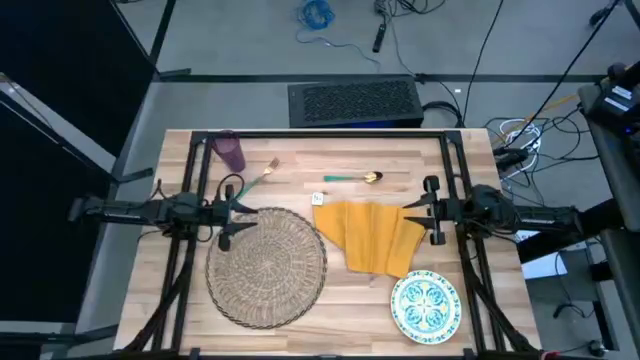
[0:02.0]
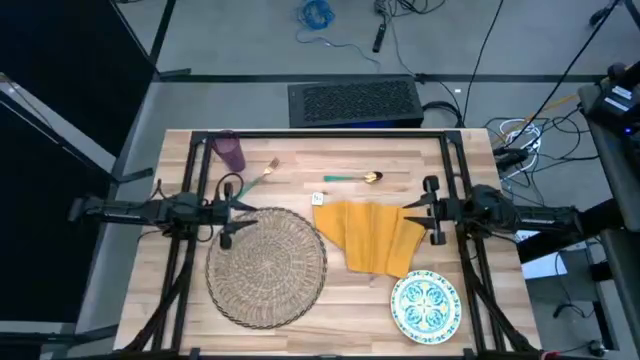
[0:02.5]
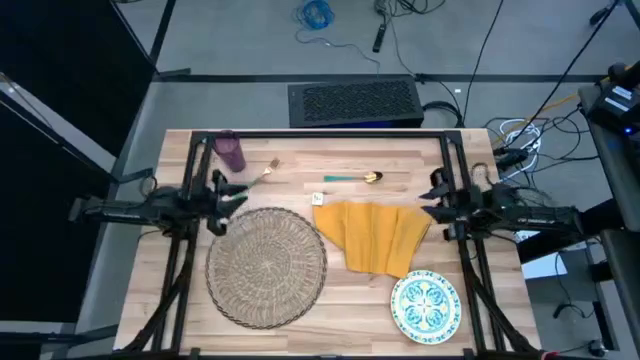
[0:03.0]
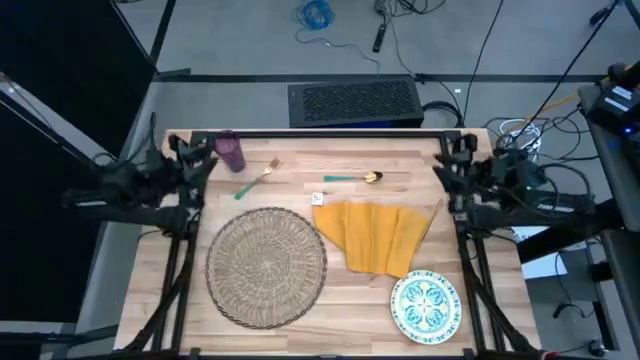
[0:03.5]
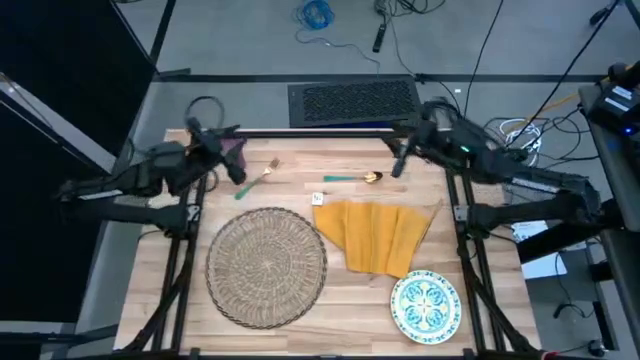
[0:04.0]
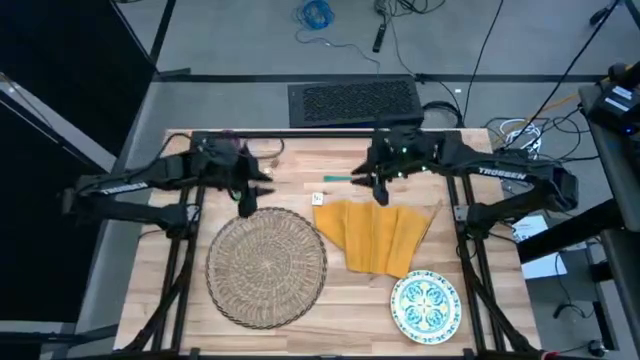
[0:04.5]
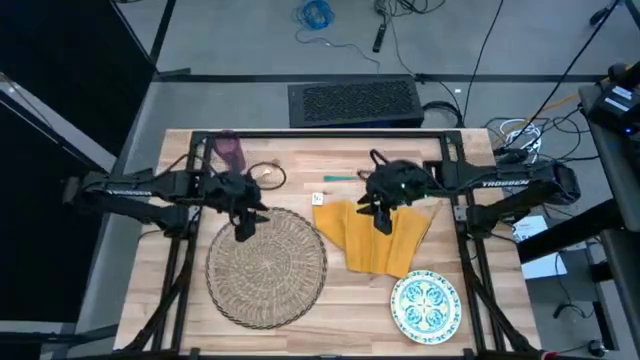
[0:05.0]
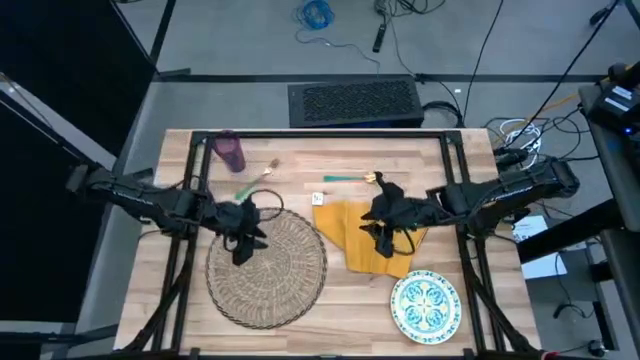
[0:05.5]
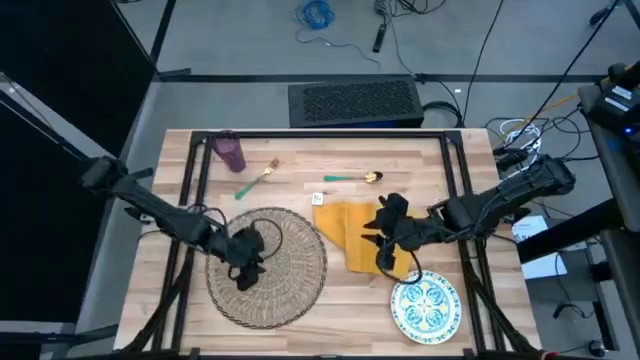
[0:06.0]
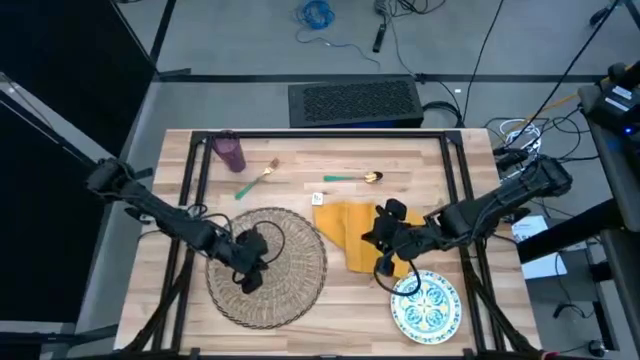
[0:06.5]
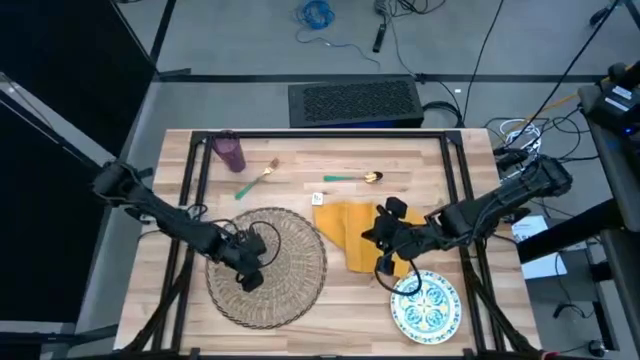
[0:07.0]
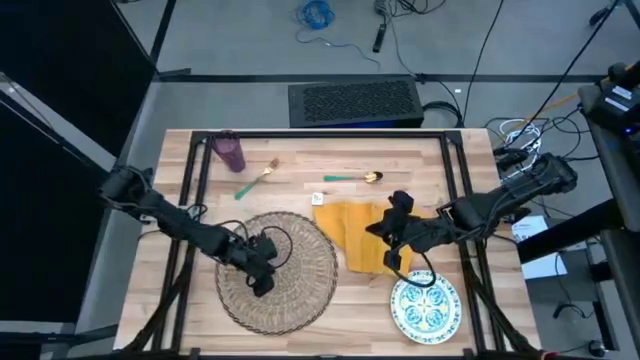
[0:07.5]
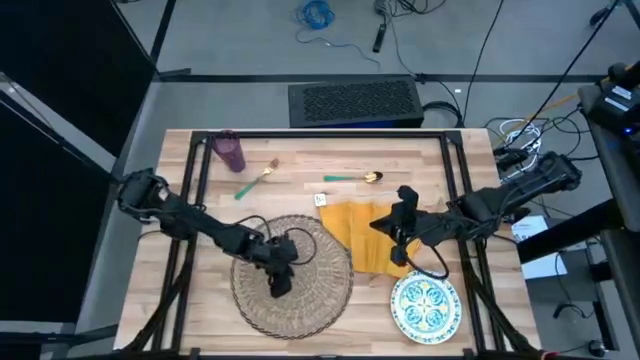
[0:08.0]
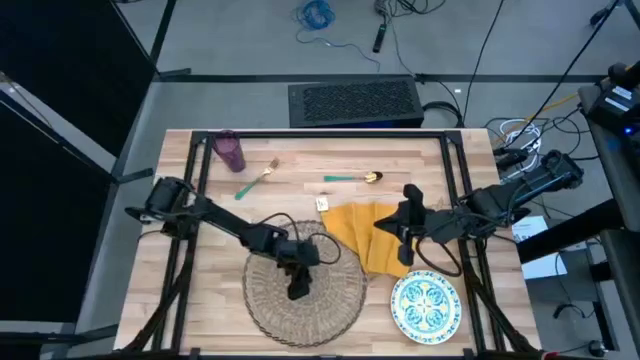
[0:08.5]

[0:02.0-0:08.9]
Task: Set table place
Move the brown tablemat to the center of the table

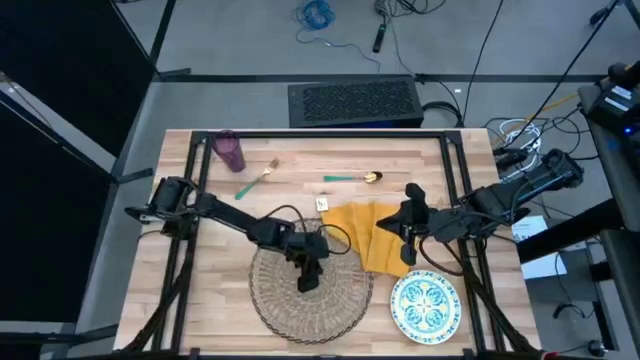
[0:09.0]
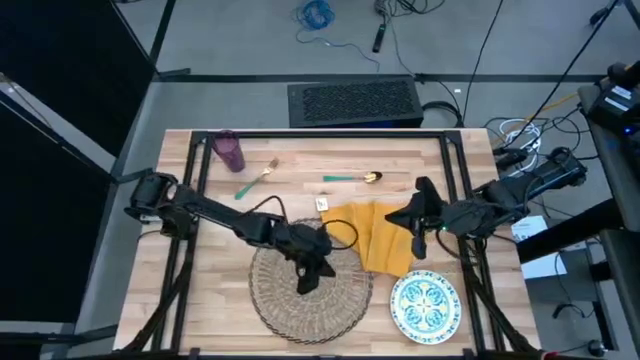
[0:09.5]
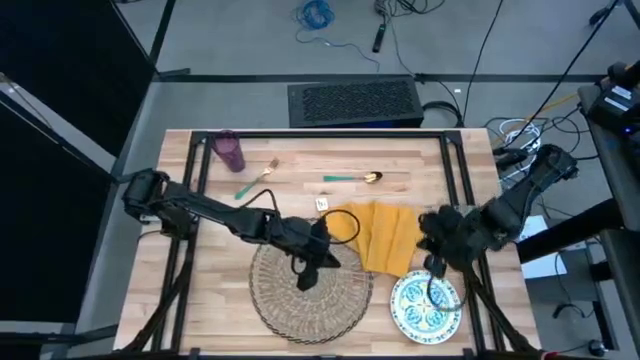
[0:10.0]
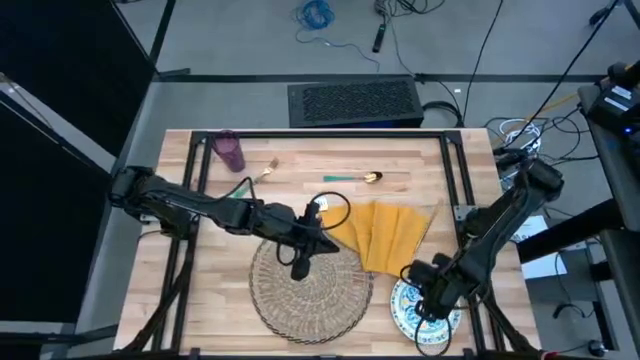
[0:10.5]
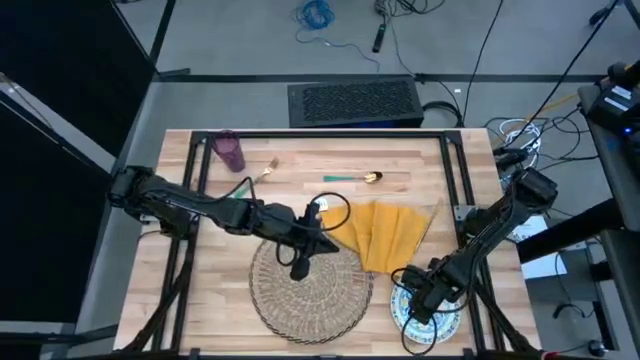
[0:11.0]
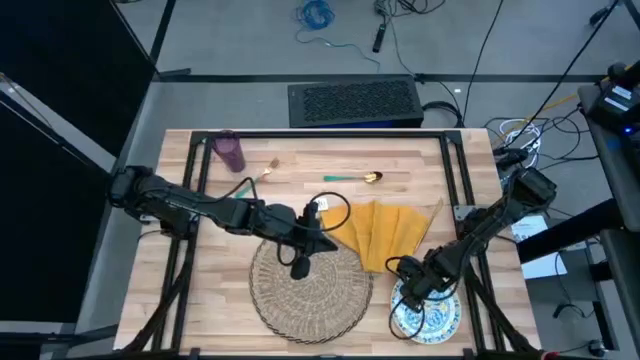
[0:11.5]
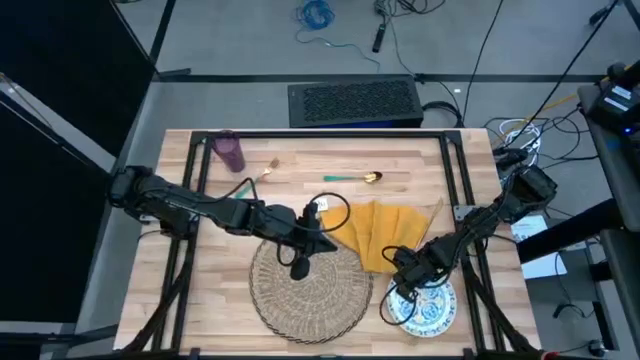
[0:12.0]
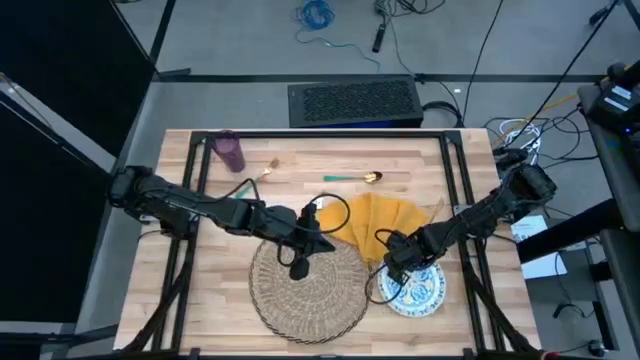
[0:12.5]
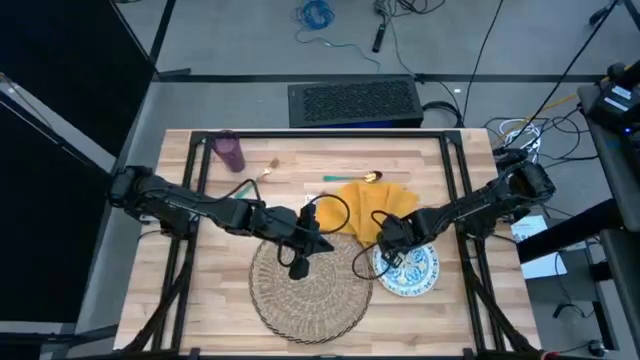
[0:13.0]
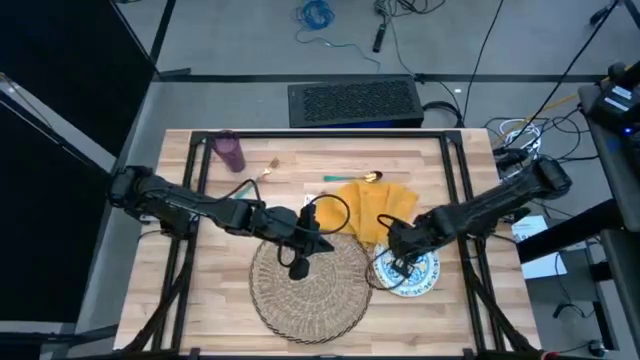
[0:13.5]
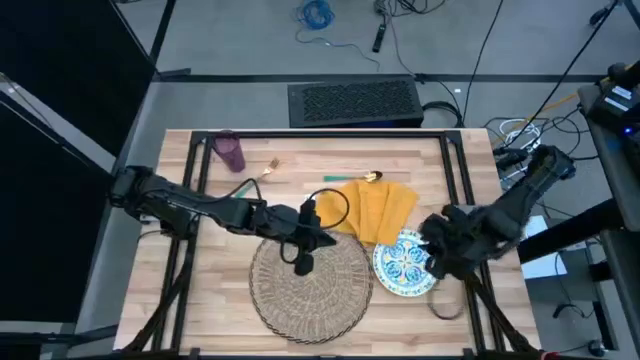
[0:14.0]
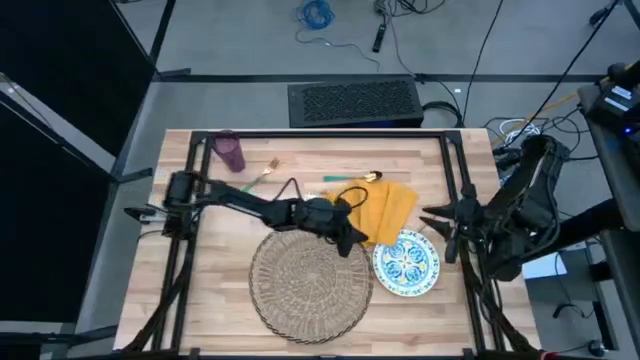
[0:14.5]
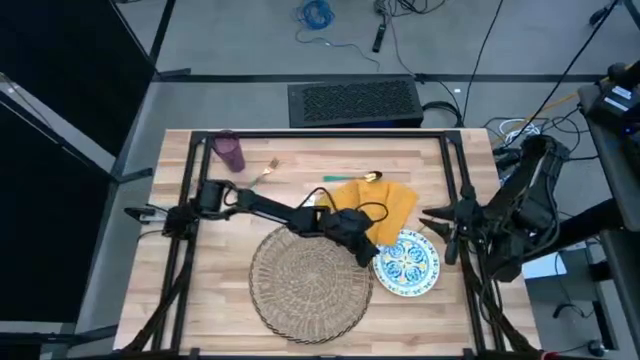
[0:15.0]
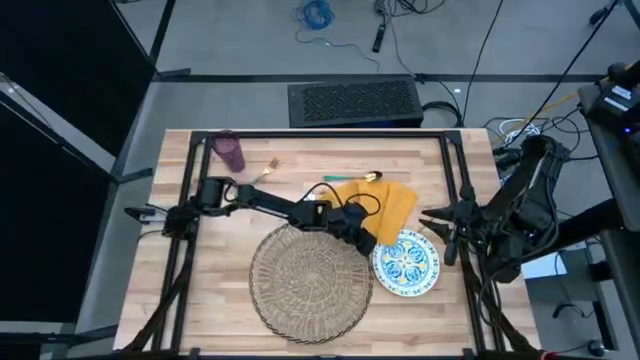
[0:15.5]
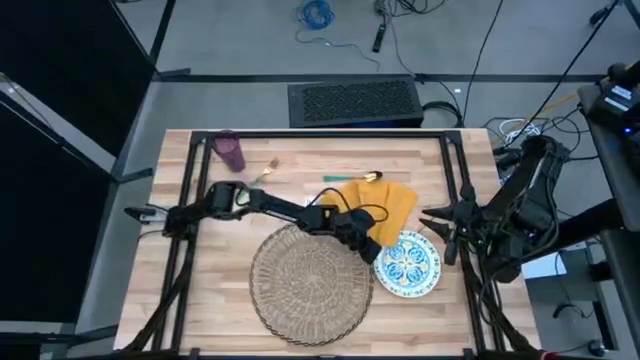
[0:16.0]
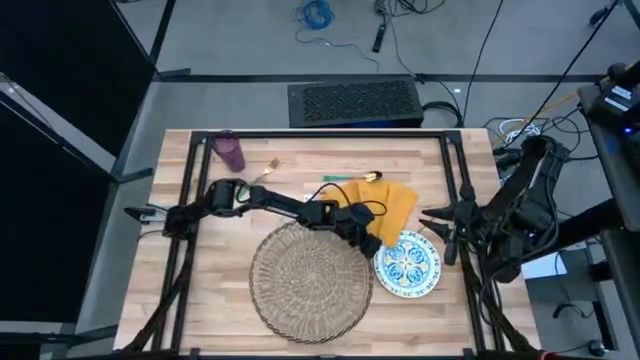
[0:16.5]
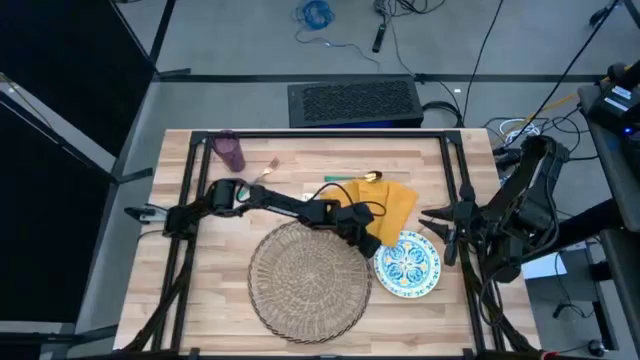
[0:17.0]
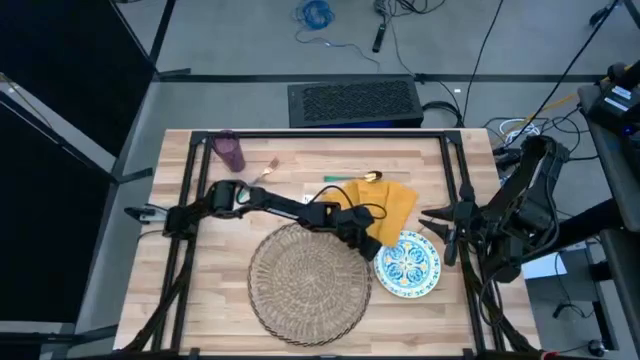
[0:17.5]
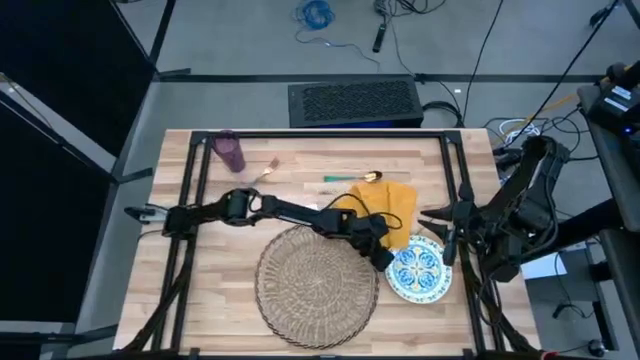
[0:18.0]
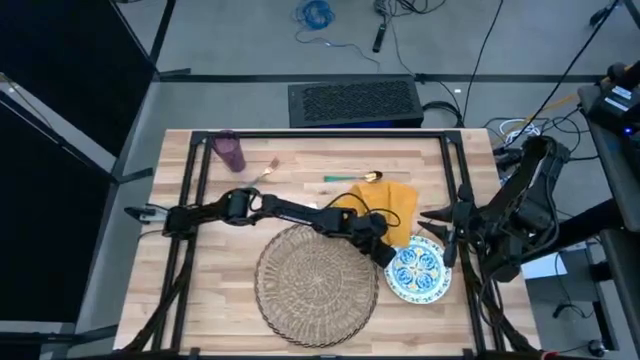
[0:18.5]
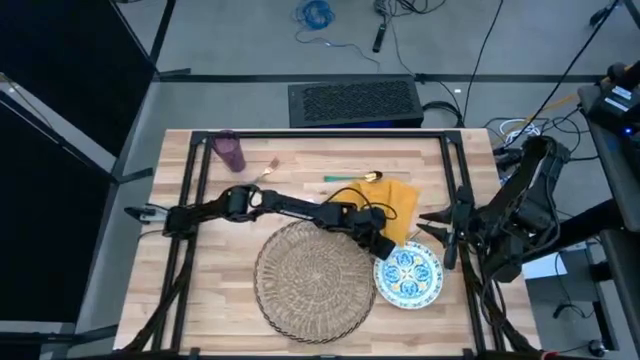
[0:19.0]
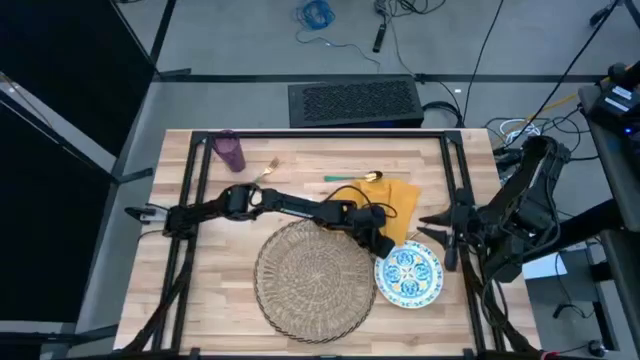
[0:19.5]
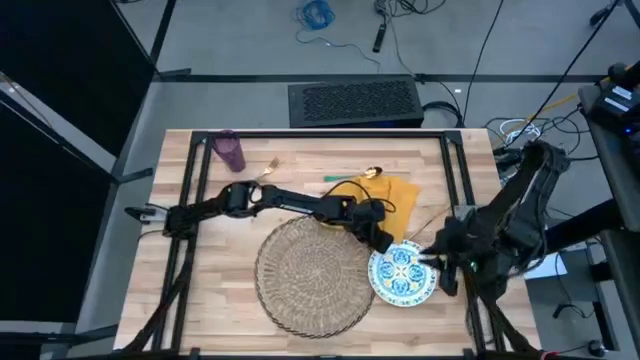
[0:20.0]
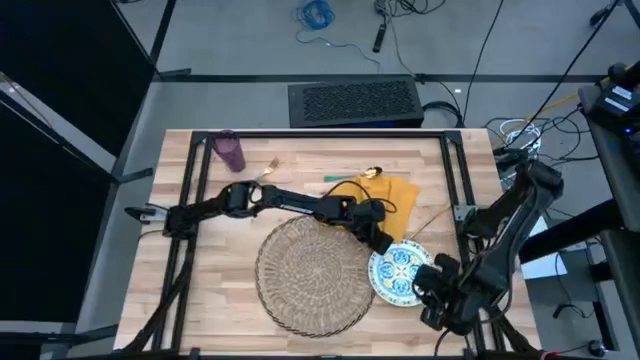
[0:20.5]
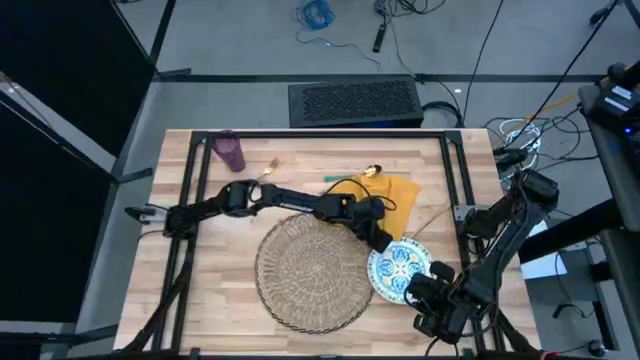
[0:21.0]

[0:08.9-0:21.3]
Put the blue patterned plate on the brown tablemat

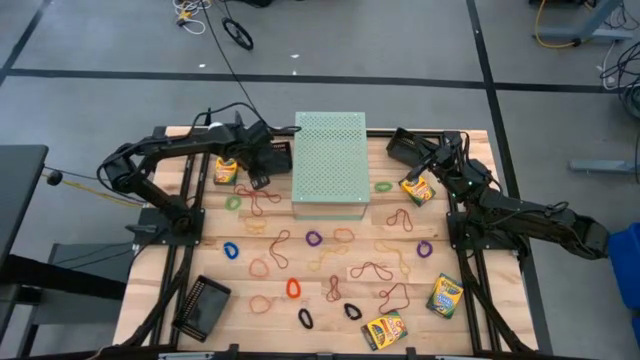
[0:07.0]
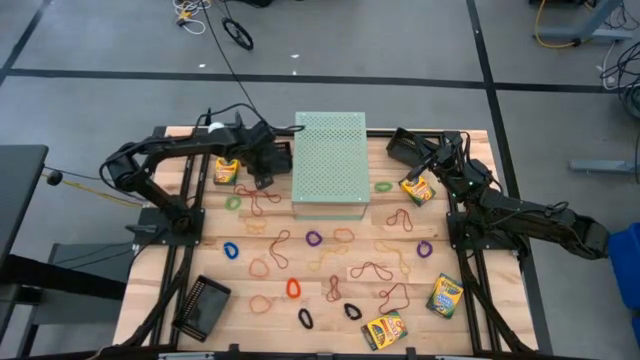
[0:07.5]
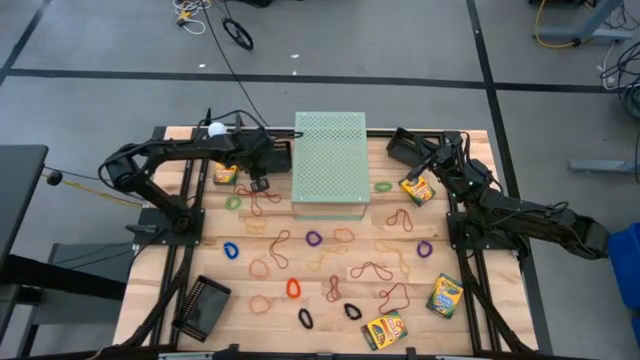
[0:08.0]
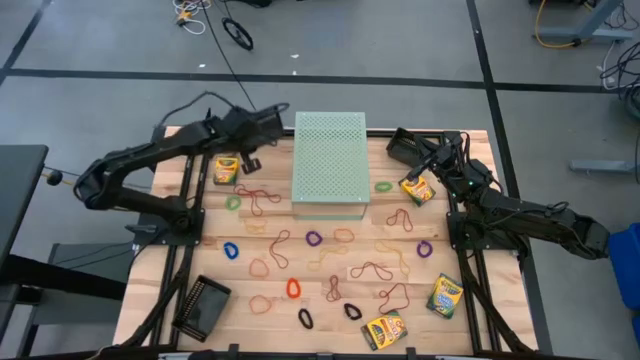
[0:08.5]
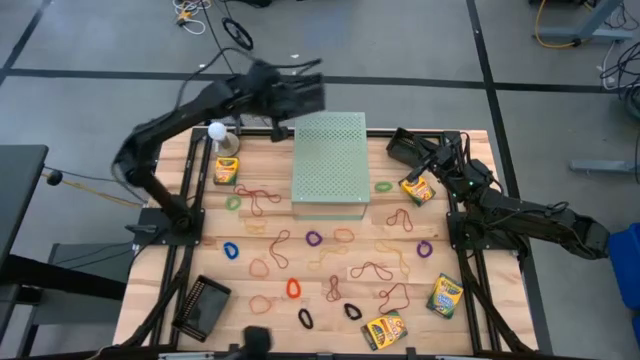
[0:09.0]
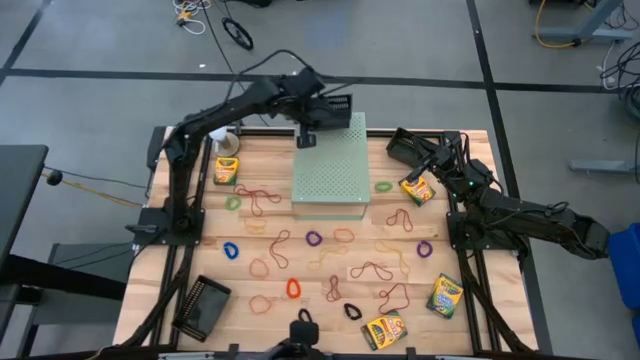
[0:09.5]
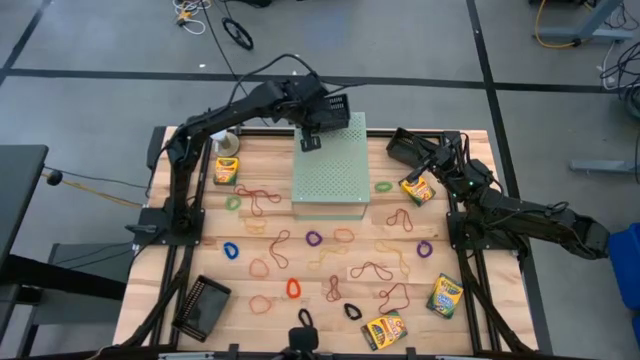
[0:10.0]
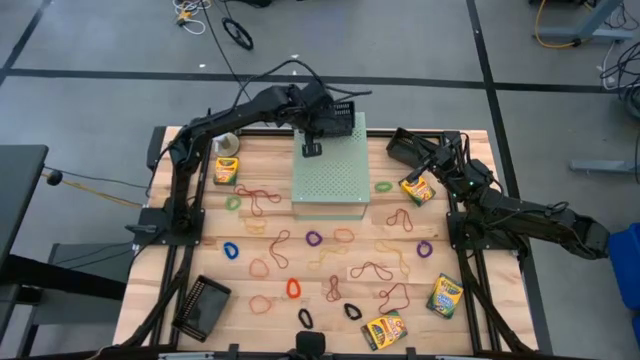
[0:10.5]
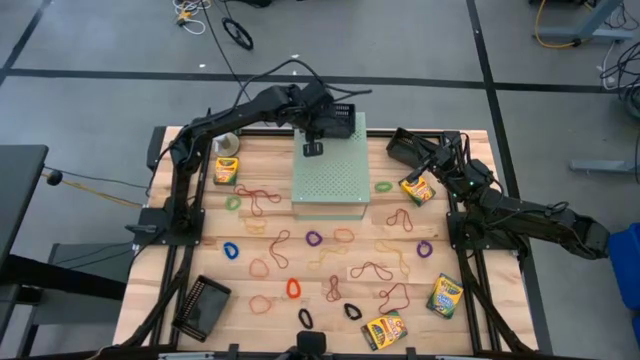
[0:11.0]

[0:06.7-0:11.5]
Task: Pick & Place Office Desk Supplies
Put the top left black bin on the shelf
